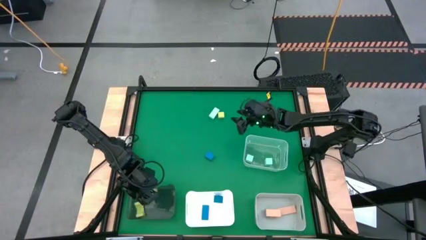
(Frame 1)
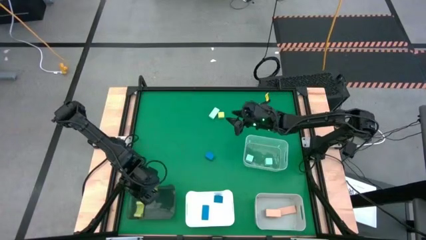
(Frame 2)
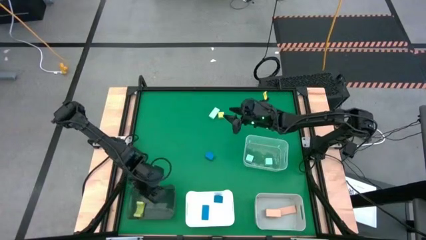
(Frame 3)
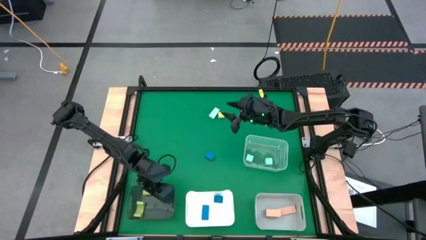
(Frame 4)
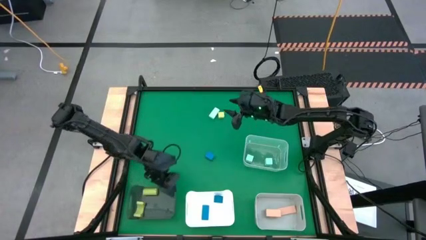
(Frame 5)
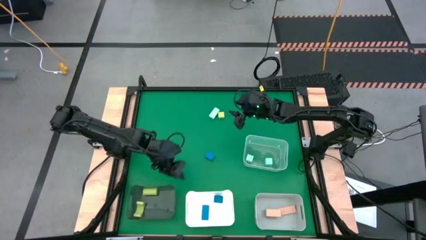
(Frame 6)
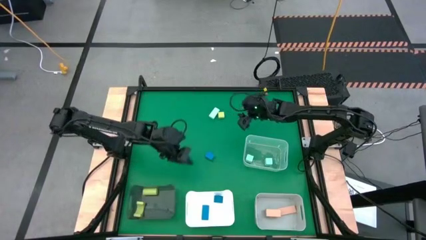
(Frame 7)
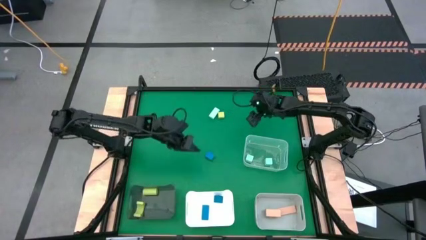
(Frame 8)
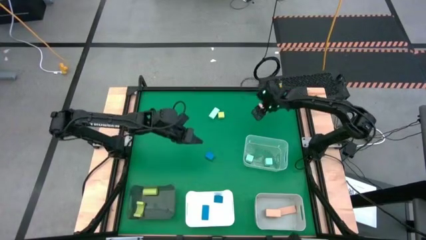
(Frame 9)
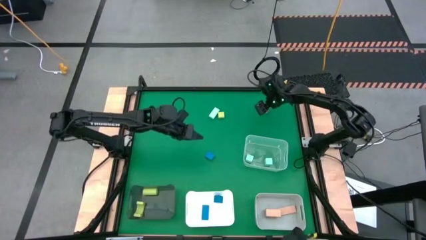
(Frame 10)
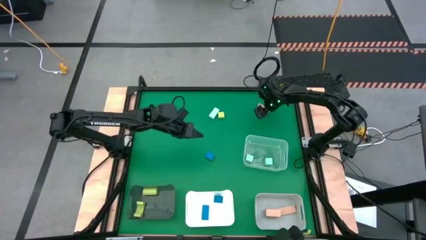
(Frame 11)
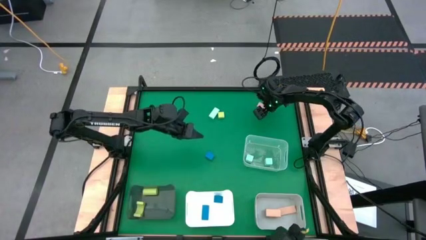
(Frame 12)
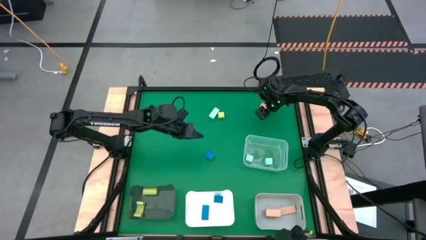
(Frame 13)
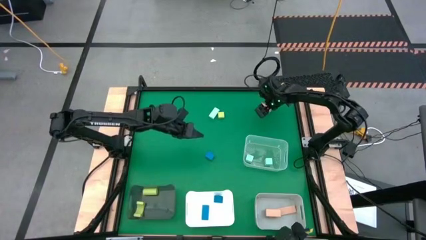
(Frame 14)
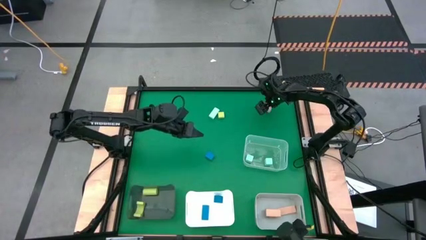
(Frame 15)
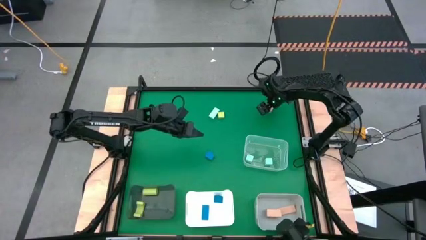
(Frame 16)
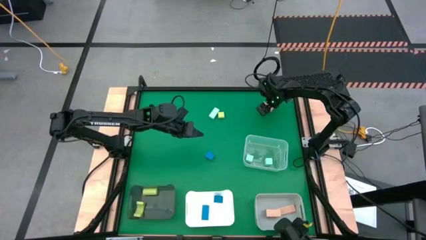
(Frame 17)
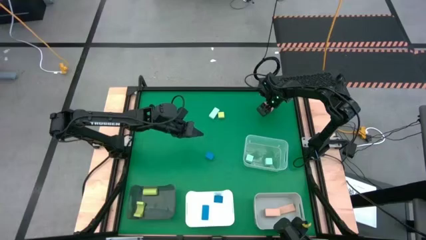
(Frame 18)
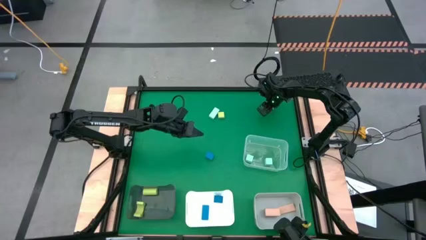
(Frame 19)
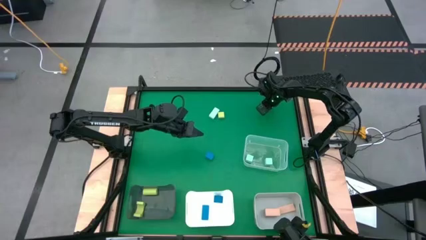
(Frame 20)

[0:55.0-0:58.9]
Task: Sort & place blocks by color
Put the brown block into the gray bin

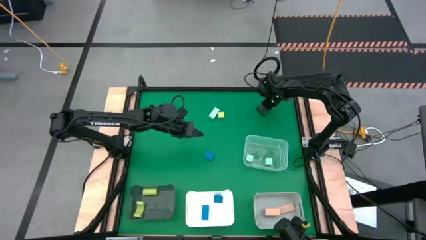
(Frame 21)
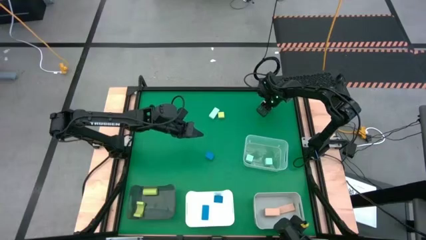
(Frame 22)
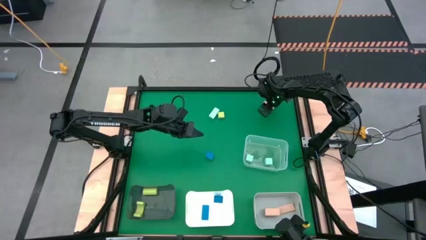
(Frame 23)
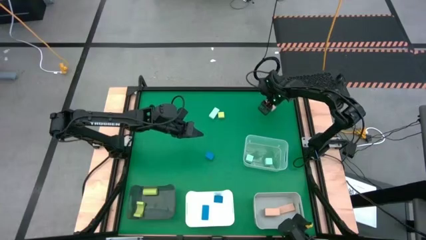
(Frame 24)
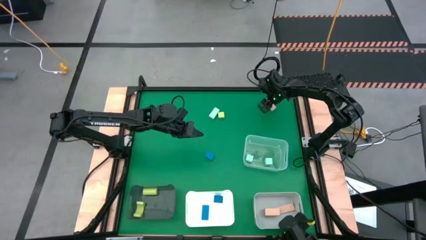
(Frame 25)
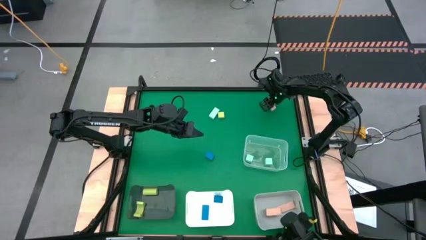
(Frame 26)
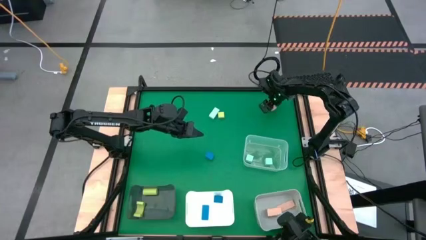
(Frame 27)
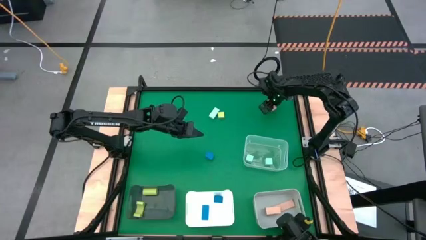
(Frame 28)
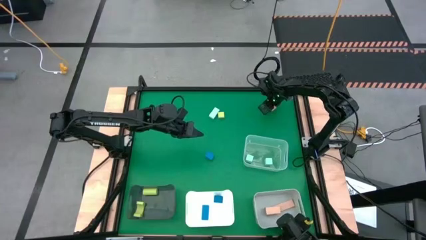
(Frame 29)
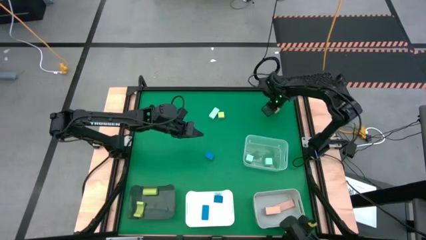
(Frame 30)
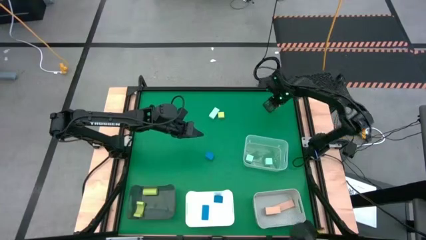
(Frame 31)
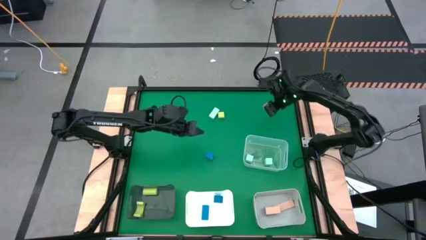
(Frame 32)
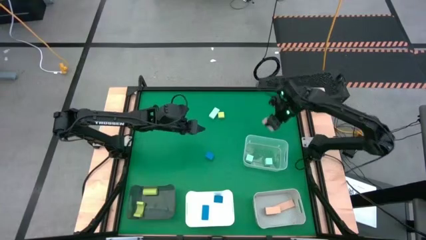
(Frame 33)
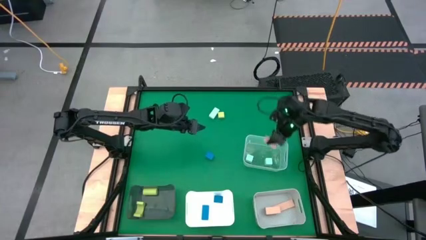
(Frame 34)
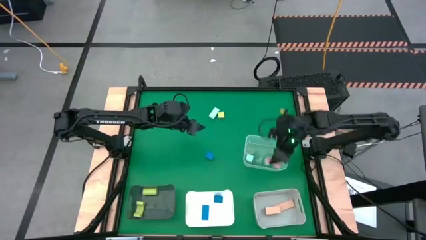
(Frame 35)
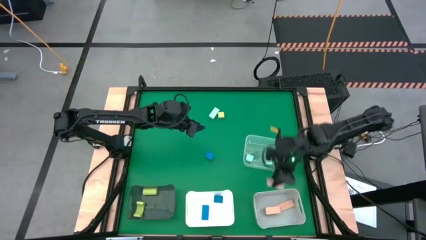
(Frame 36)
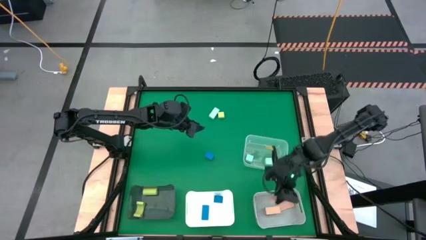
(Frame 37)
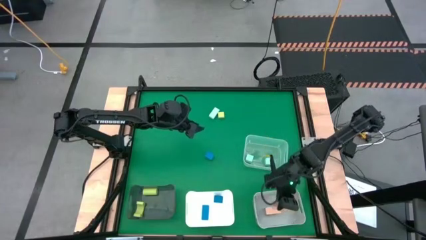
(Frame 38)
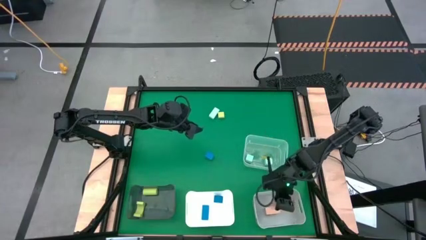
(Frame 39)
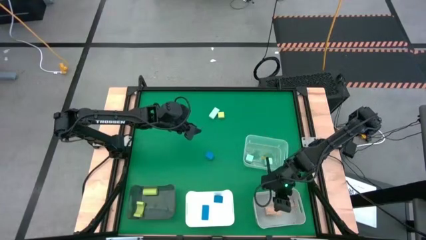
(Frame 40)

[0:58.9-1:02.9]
Put the brown block into the gray bin

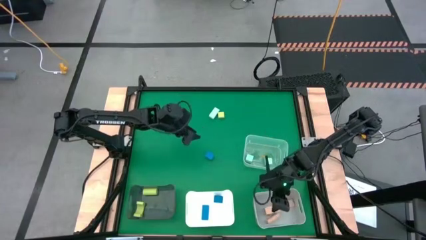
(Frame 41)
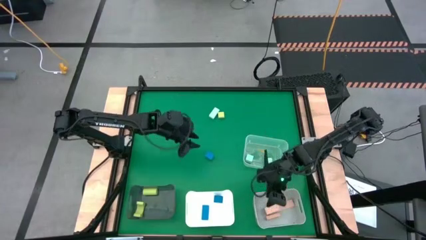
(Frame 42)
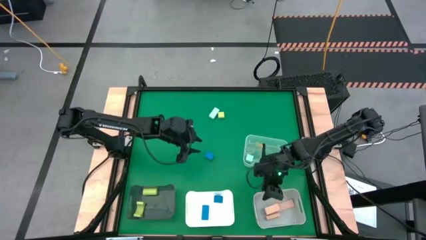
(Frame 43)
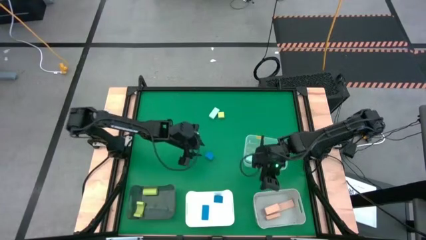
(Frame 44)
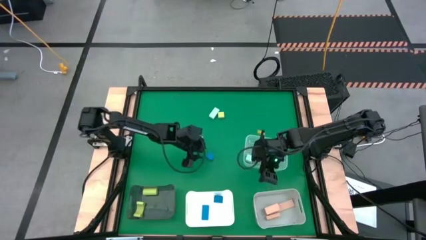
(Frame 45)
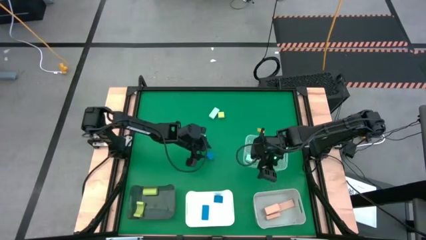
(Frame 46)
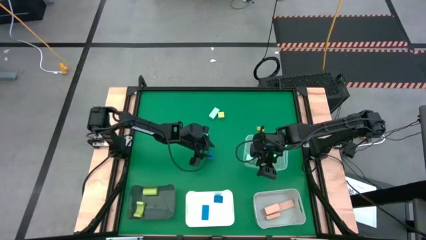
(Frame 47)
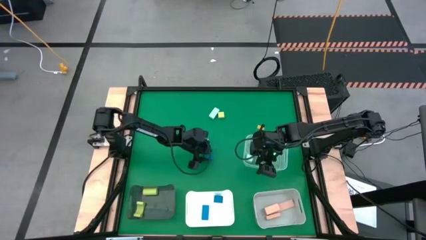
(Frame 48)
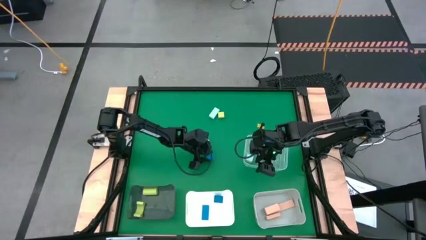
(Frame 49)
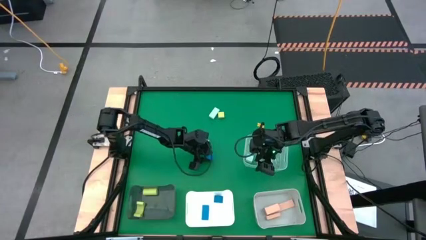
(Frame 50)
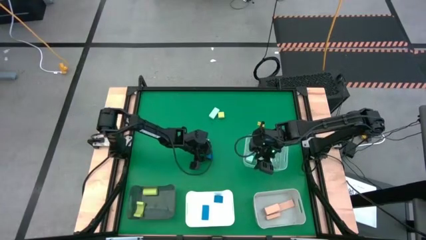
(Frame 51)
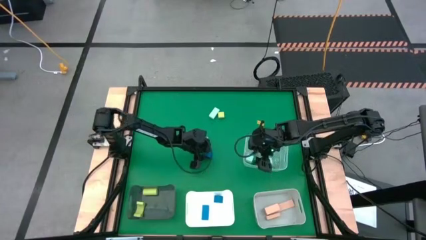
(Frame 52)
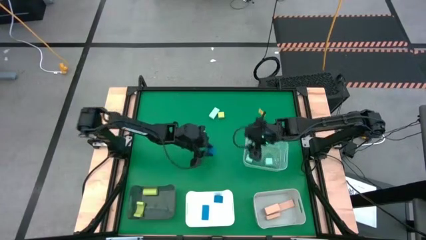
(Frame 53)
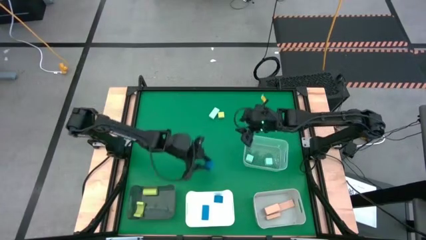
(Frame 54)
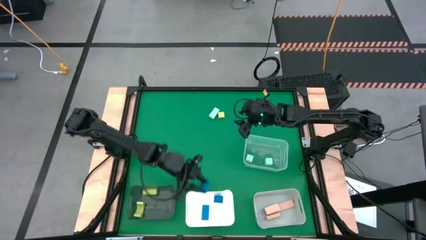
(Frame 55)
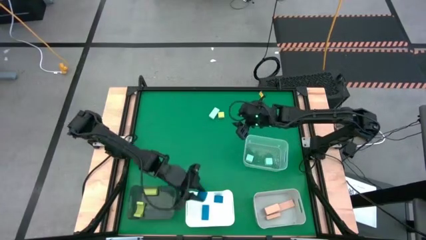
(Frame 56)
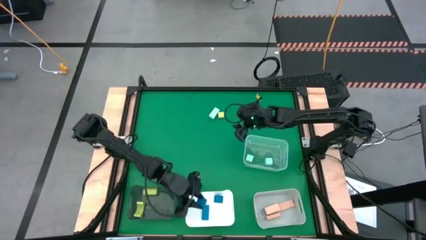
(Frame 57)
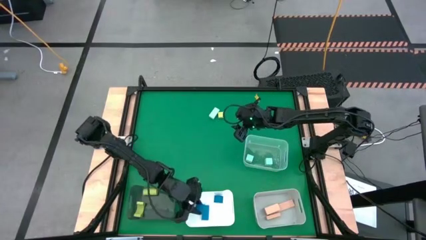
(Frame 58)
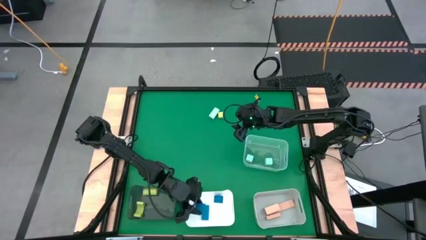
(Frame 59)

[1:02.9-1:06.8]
Put the blue block into the white bin

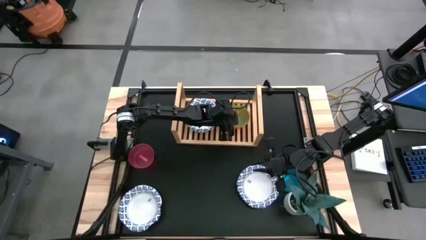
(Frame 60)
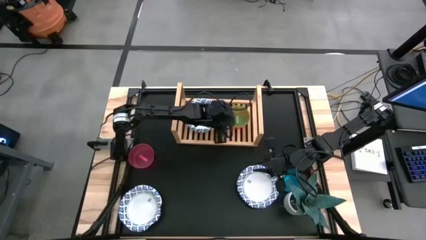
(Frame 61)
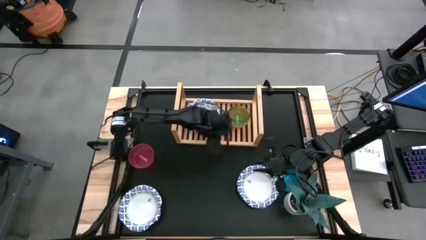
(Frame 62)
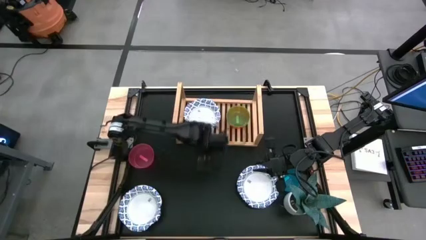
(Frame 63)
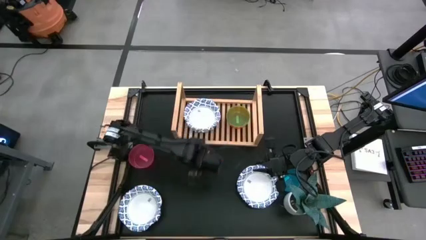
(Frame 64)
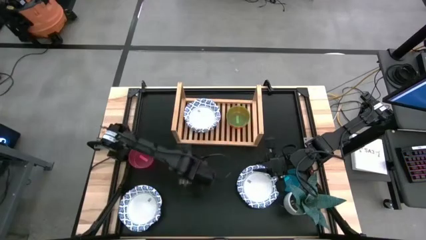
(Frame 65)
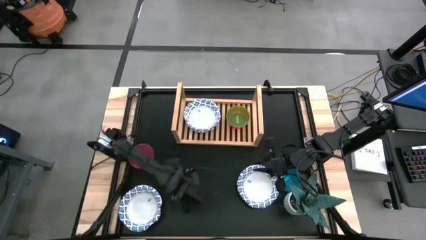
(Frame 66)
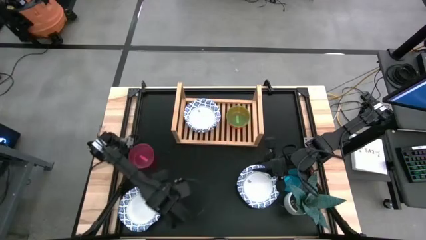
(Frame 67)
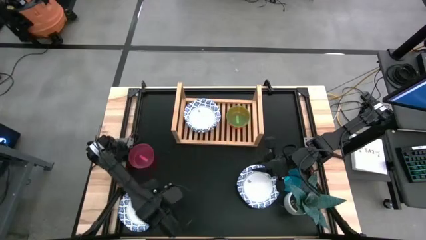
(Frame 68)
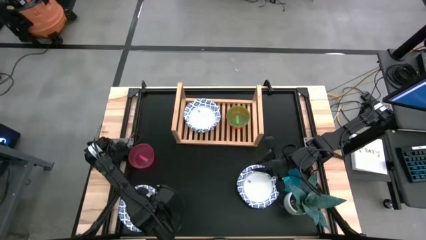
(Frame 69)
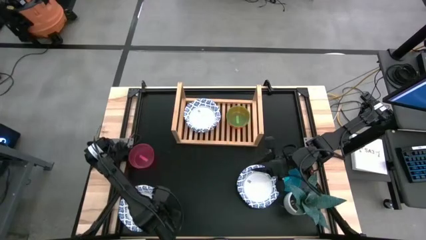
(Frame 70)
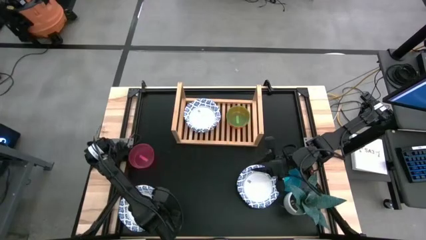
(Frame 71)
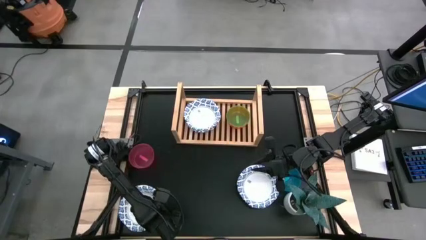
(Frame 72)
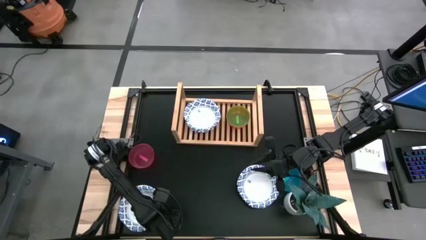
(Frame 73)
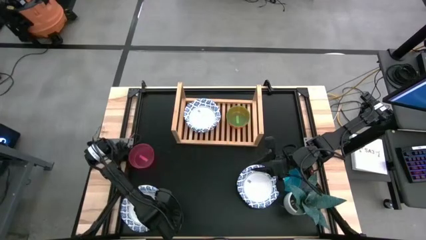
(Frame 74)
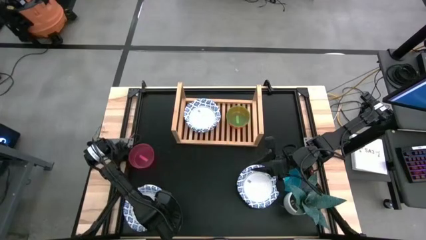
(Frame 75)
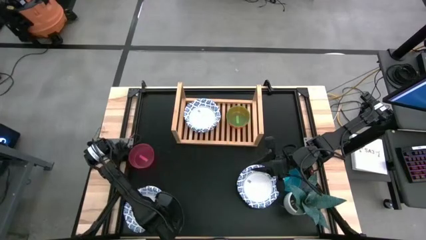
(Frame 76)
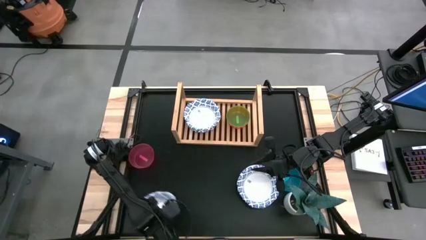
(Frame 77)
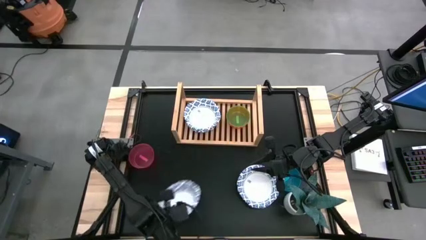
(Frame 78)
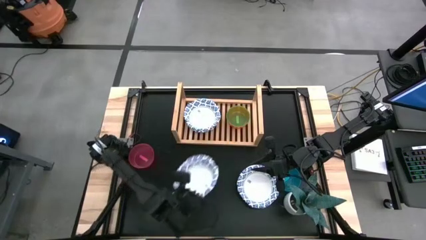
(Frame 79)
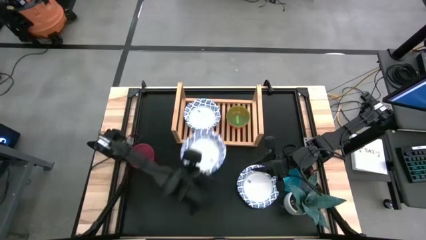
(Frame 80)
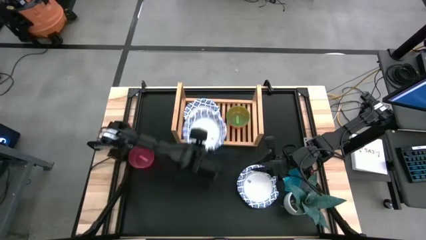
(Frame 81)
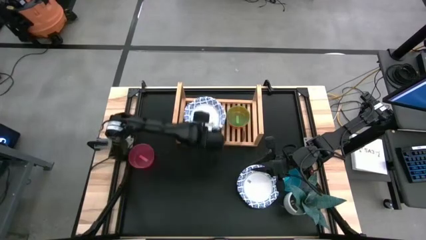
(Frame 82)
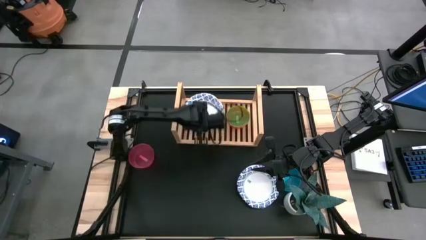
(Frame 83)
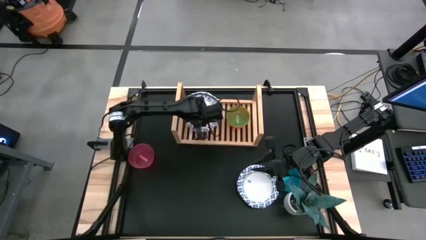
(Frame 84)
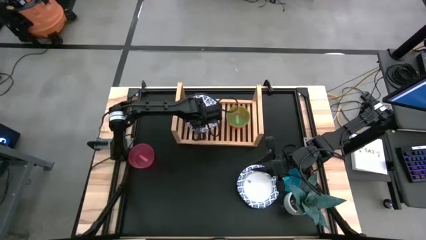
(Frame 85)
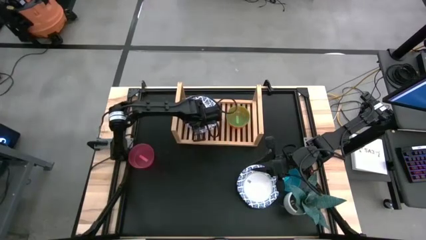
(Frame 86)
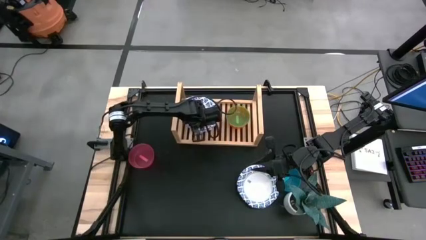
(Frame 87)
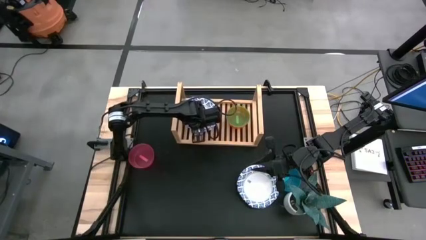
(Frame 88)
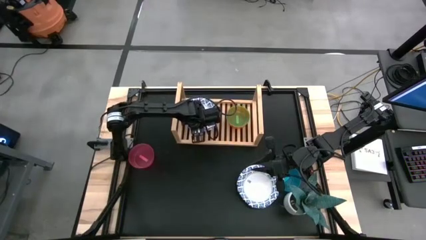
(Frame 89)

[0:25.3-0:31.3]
Task: Place and stack bowls onto a shelf
Stack the large white bowl on top of the large white bowl on the shelf
